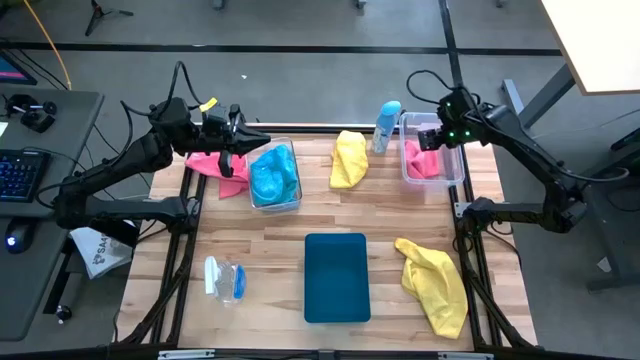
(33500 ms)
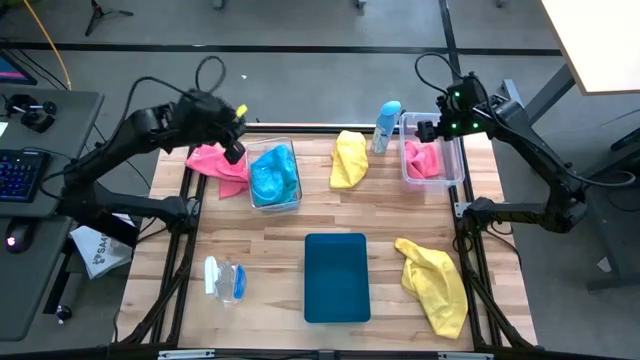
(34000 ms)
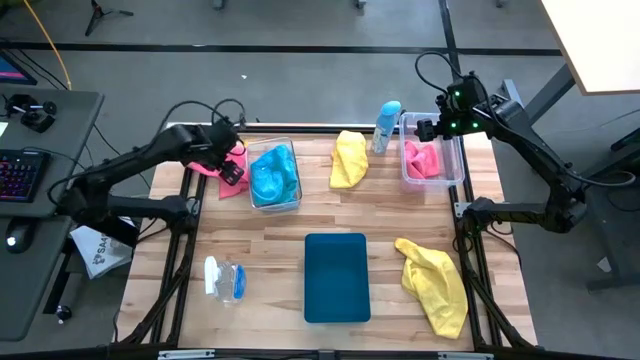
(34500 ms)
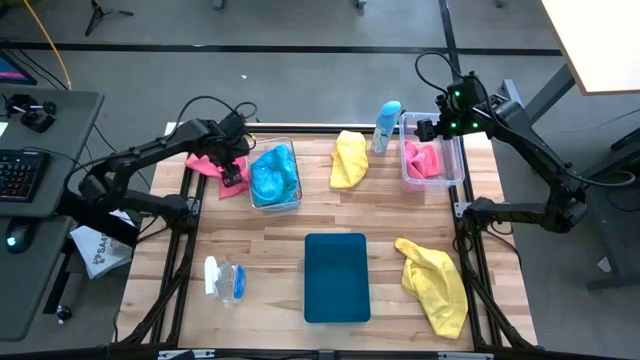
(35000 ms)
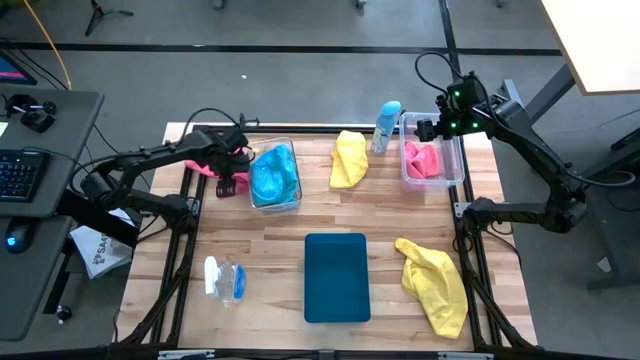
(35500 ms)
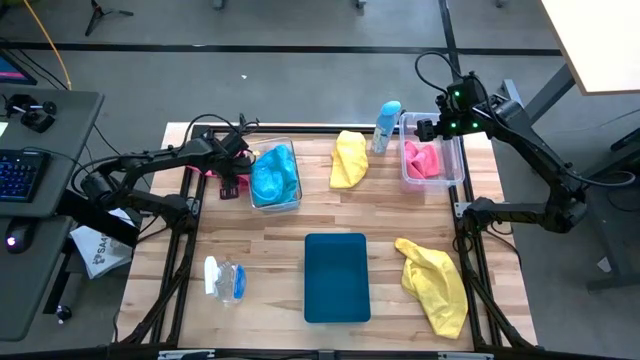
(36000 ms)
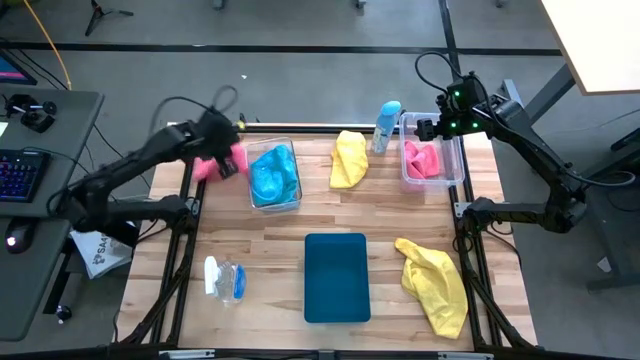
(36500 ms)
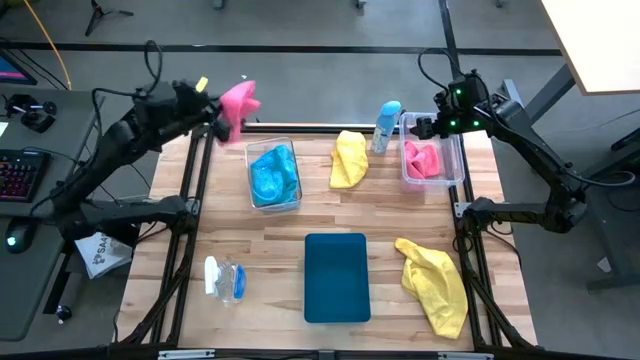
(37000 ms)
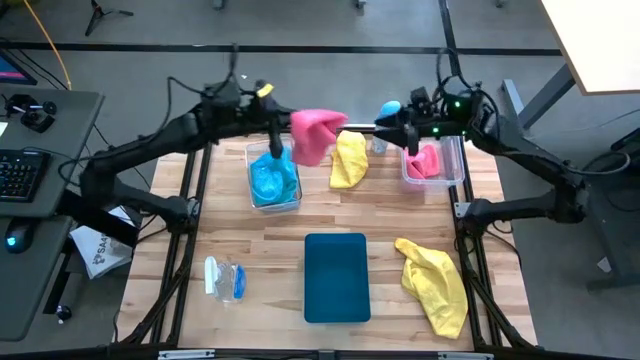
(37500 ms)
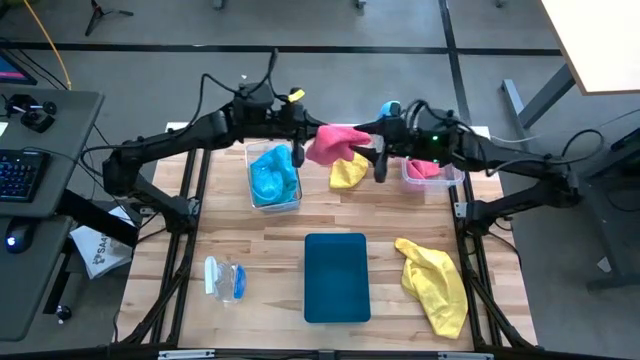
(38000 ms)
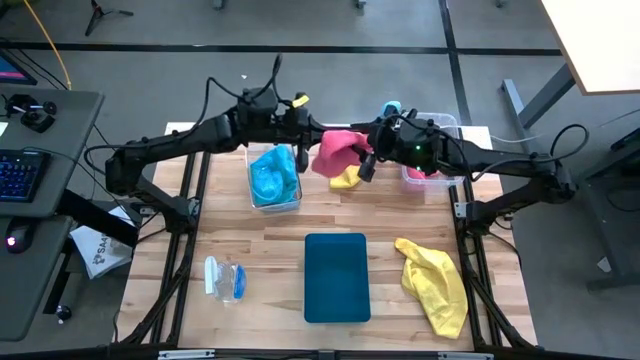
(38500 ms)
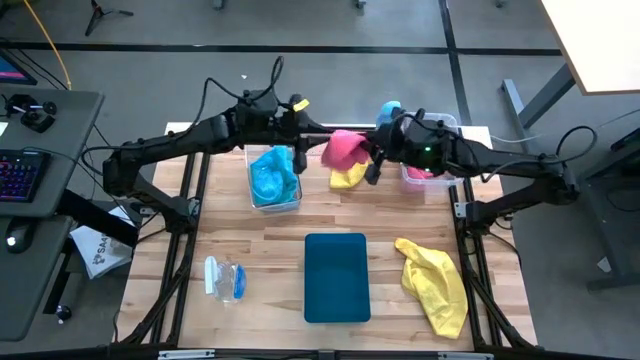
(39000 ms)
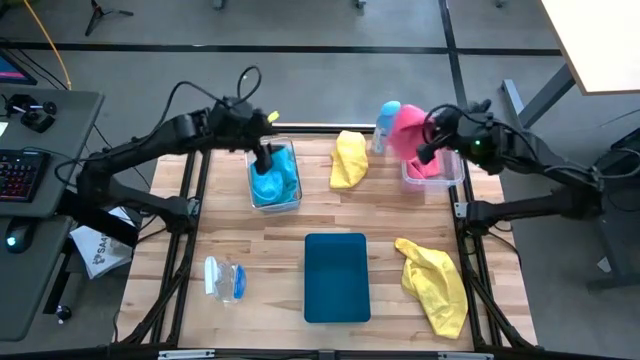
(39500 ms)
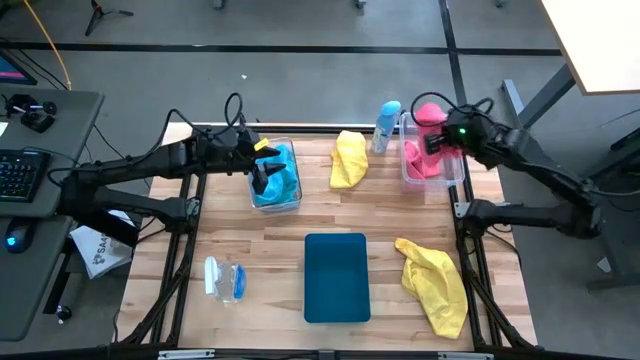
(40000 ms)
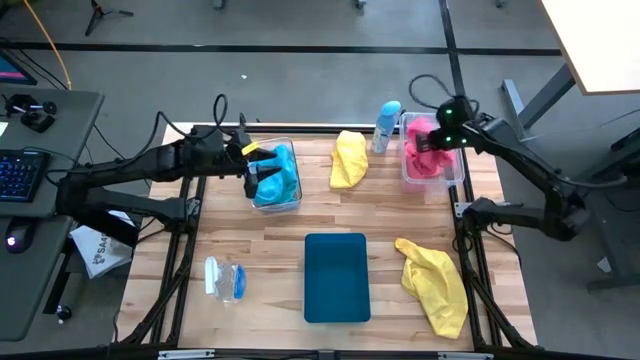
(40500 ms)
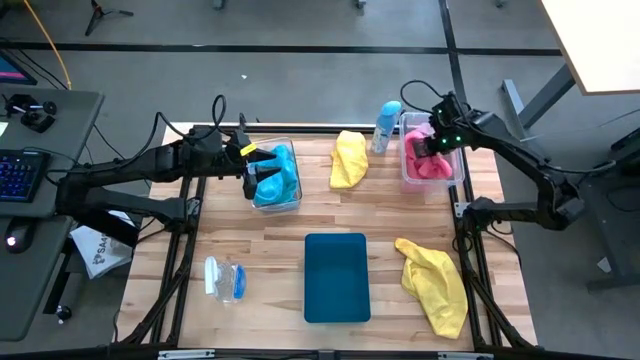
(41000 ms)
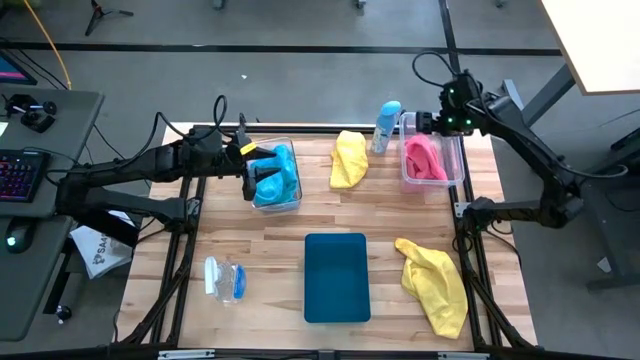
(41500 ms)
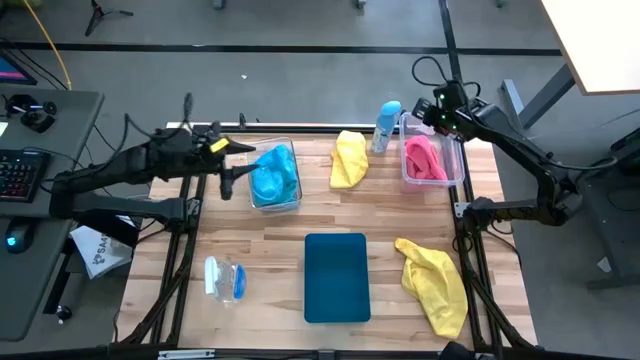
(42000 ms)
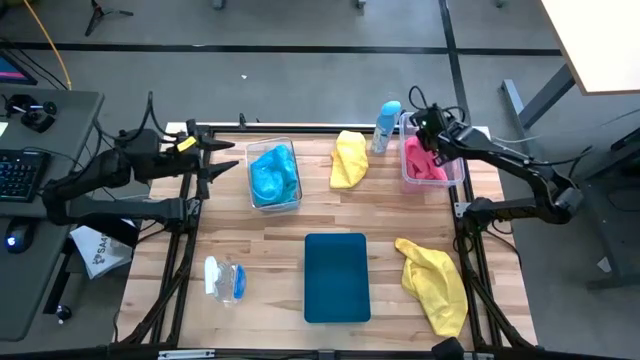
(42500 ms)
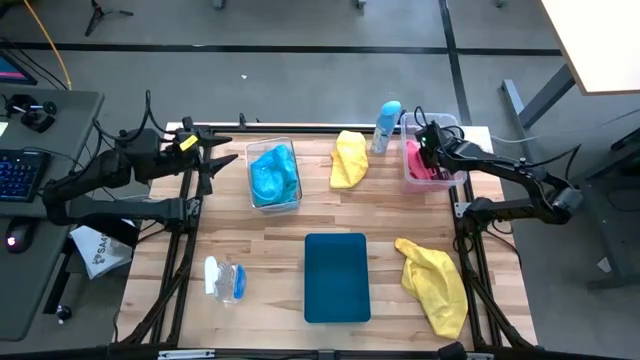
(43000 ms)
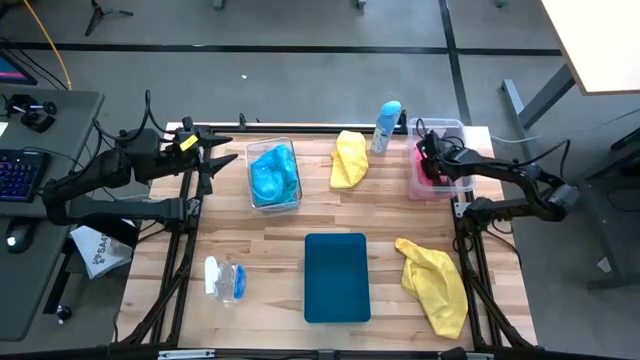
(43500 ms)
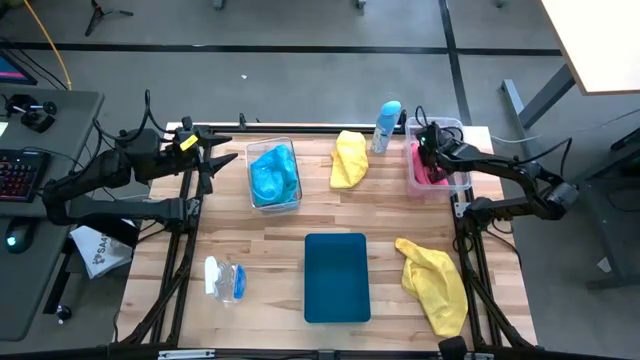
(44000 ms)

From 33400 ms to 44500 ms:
Task: Sort microfiber towel by color & place in baskets
Put the pink towel into the right transparent bin

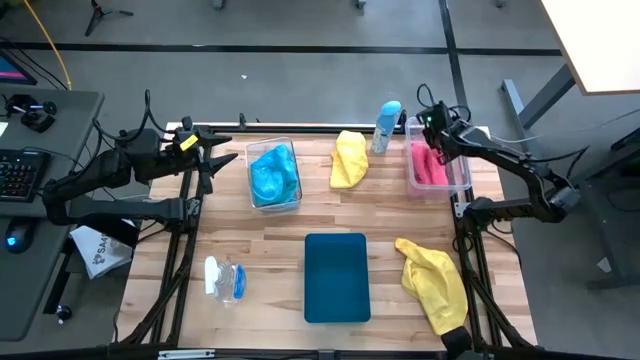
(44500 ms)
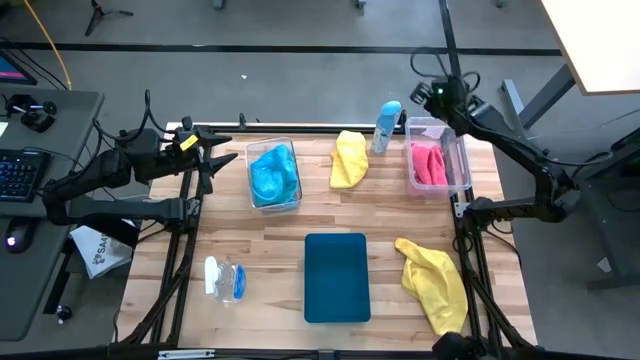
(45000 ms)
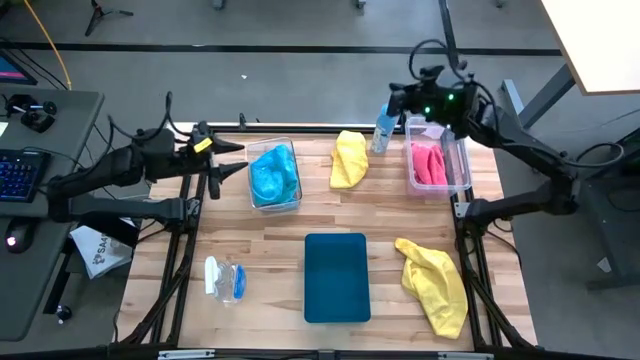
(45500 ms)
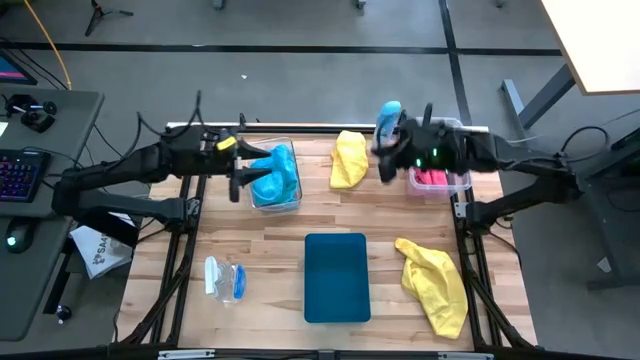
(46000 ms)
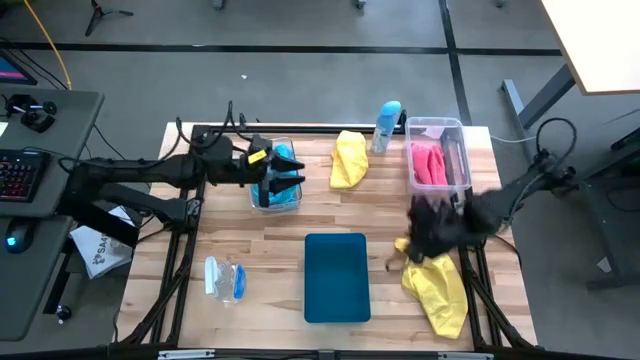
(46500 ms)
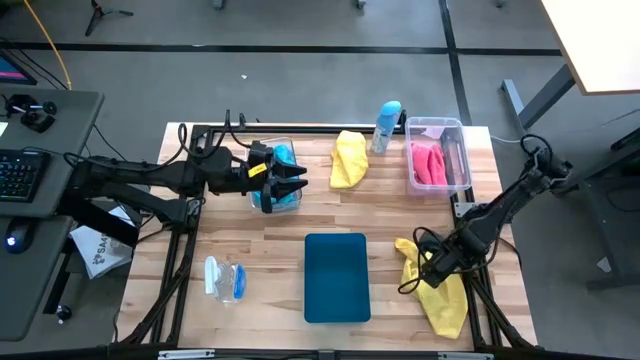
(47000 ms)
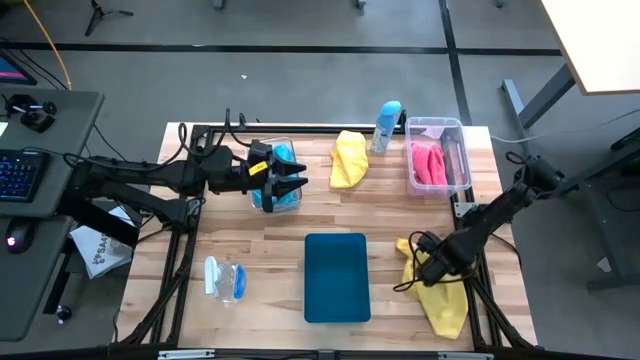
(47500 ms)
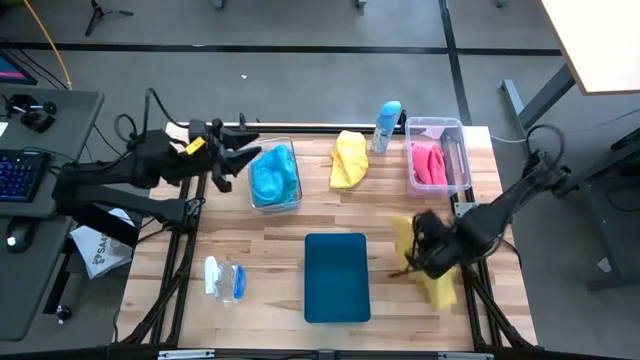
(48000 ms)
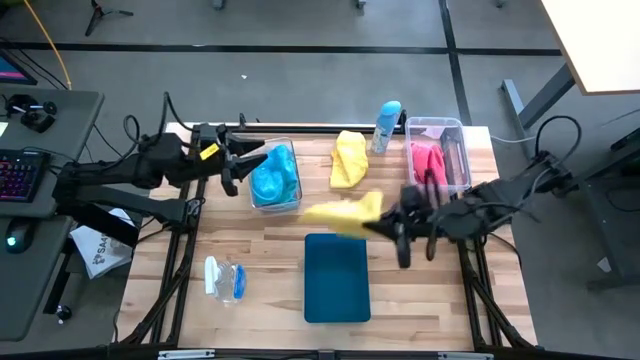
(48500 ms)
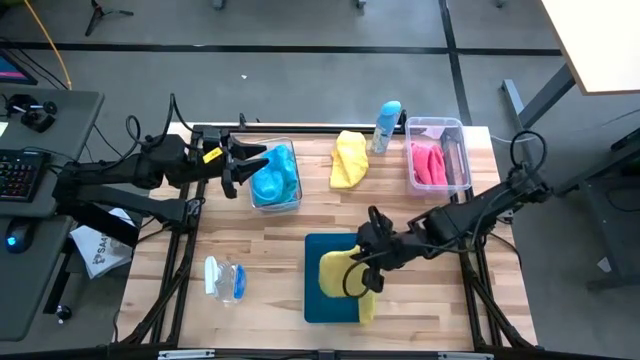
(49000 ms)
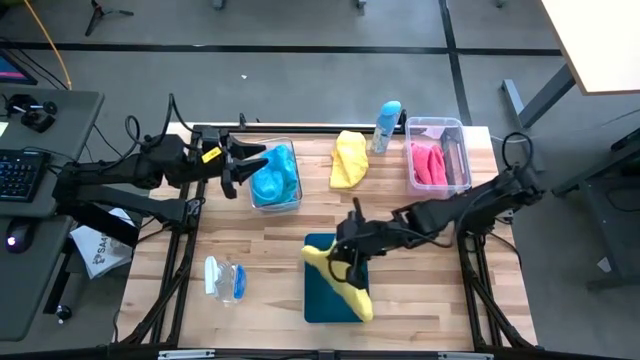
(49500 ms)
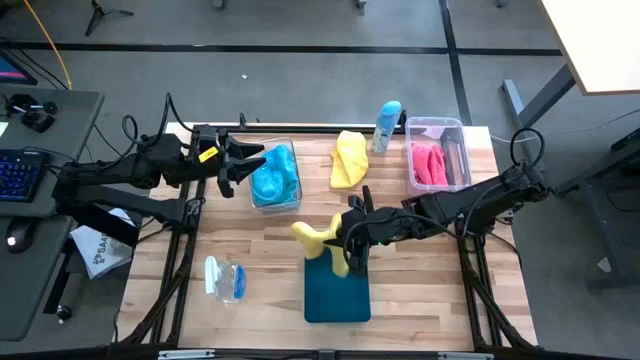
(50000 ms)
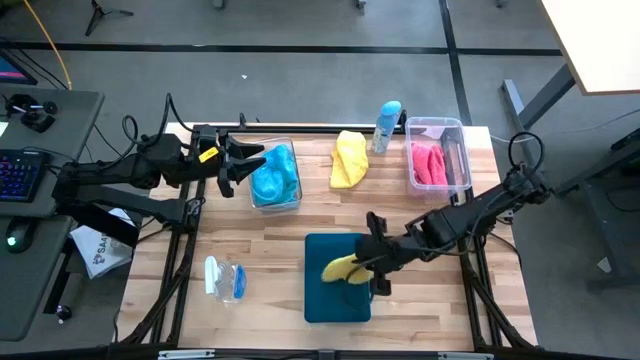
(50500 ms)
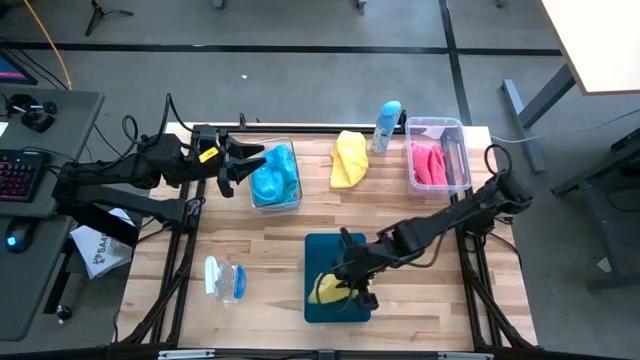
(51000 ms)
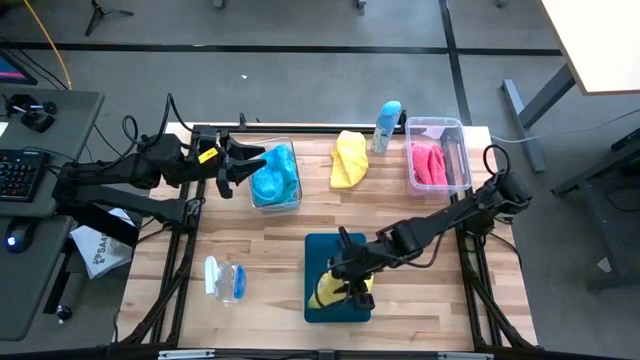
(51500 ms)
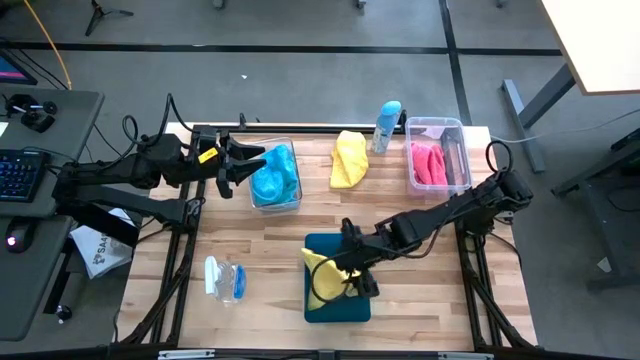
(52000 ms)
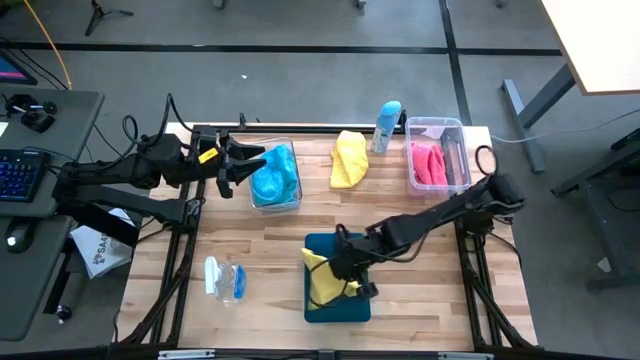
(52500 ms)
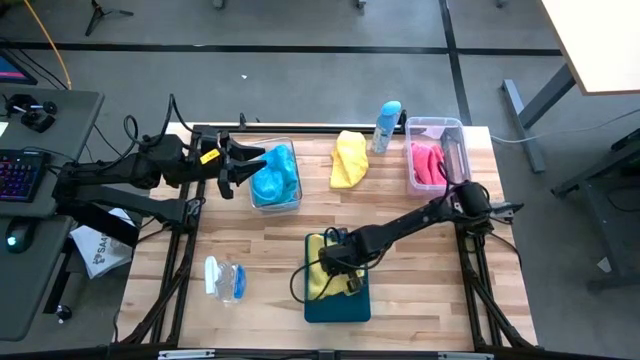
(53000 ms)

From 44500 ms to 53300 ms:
Put the bottom yellow towel into the blue bin

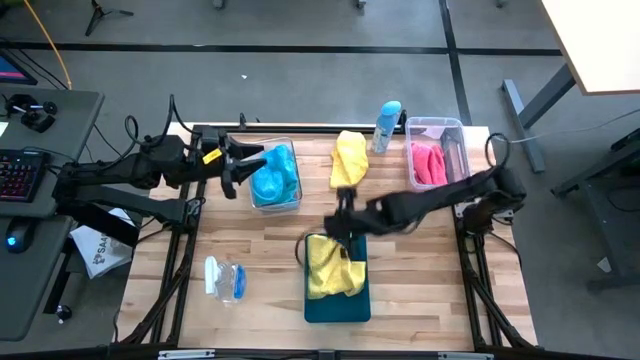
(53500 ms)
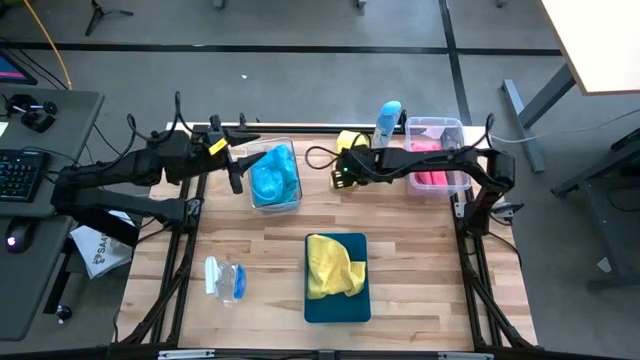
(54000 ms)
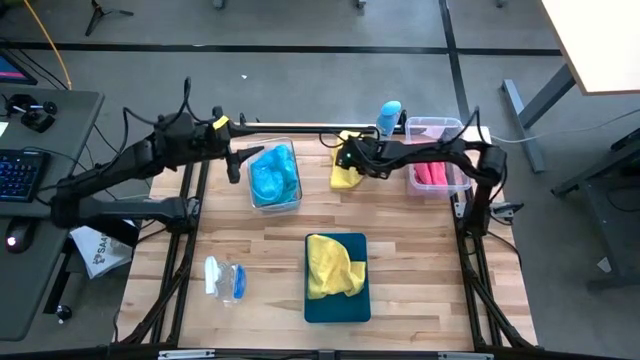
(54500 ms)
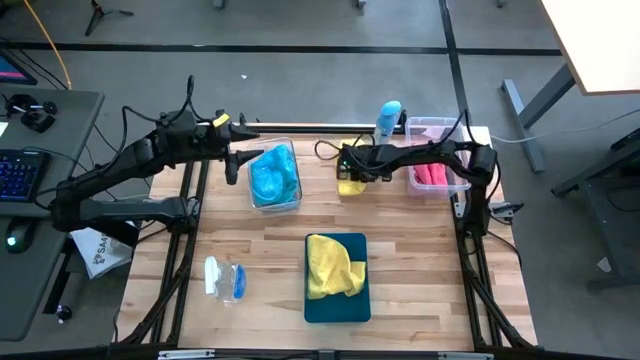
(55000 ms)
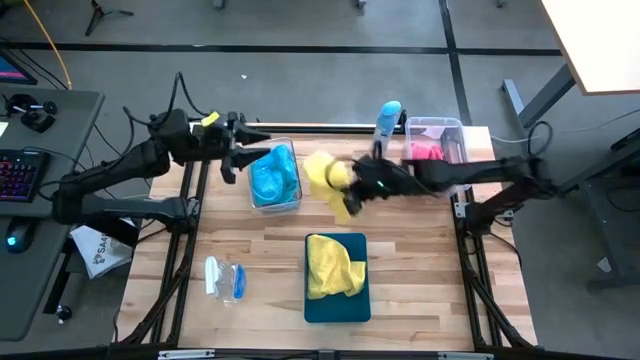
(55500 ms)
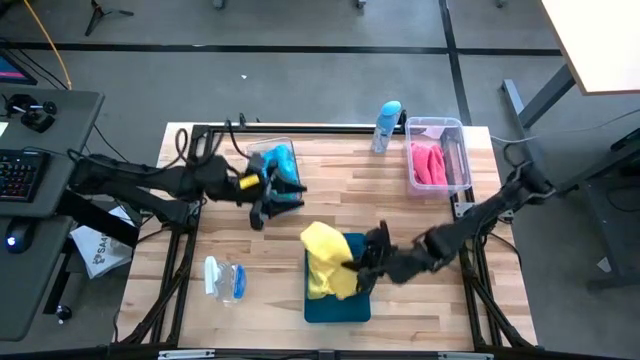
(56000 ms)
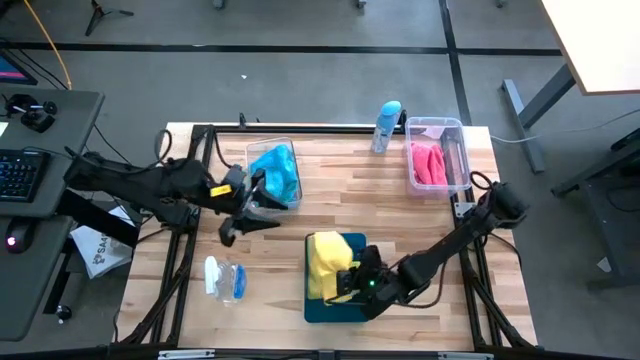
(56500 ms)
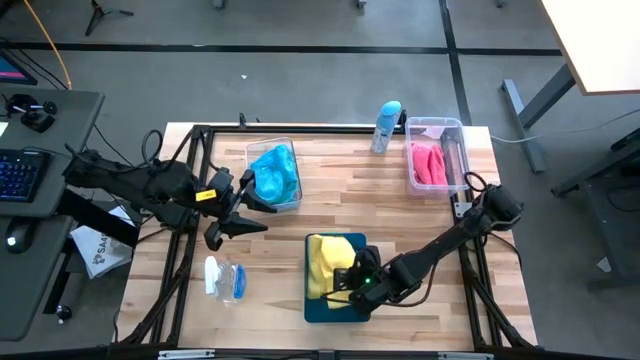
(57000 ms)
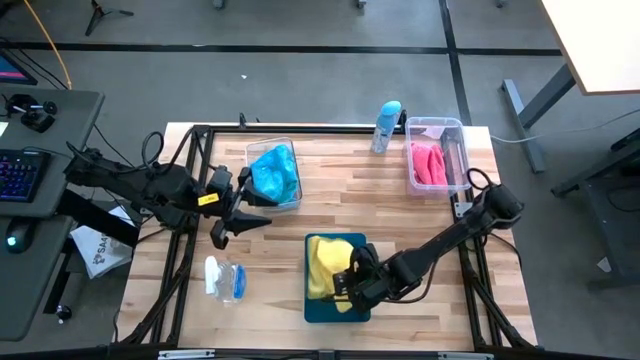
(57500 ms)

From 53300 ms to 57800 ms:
Put the yellow towel into the blue bin
